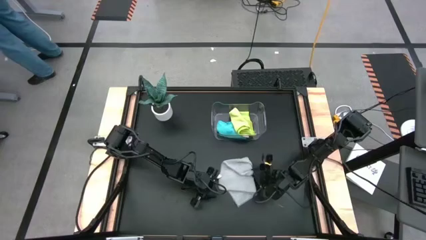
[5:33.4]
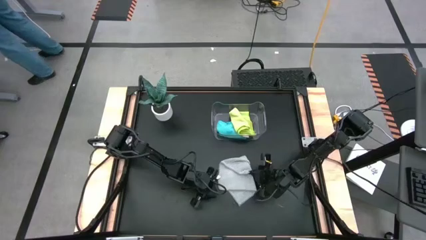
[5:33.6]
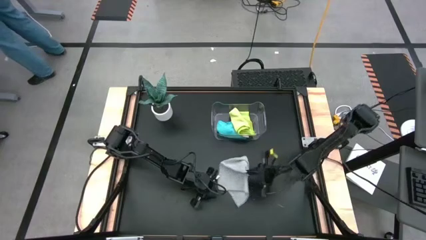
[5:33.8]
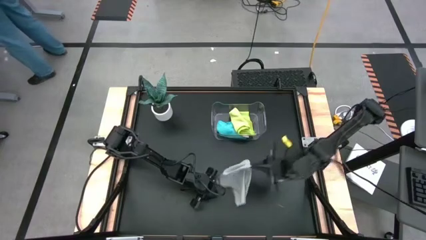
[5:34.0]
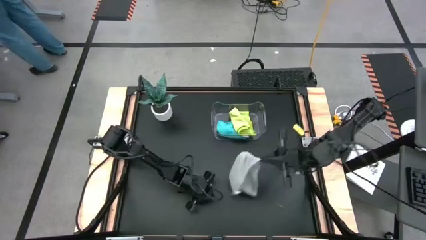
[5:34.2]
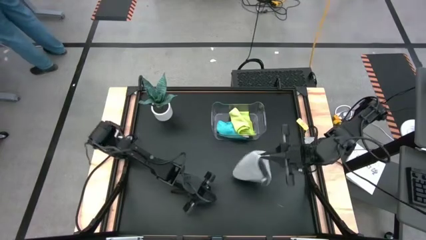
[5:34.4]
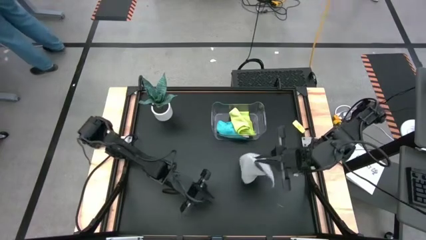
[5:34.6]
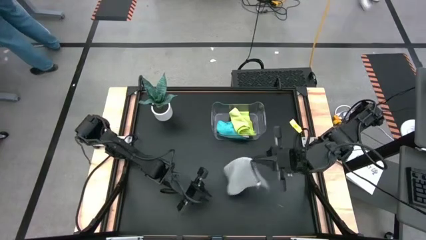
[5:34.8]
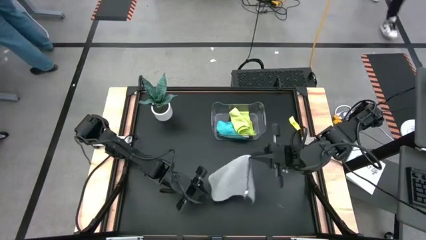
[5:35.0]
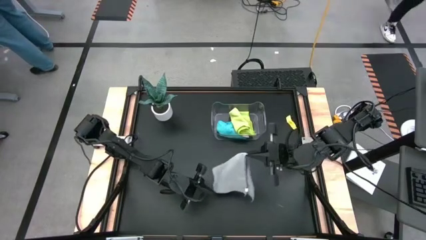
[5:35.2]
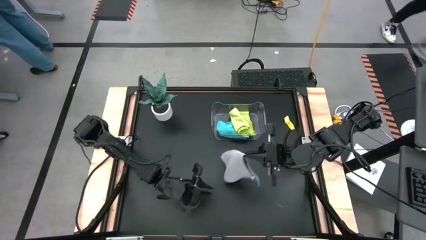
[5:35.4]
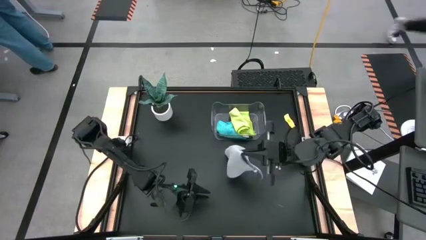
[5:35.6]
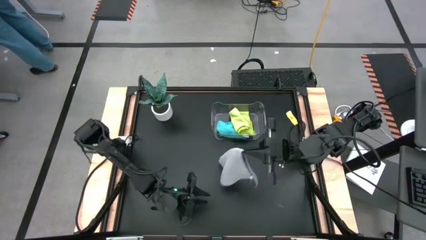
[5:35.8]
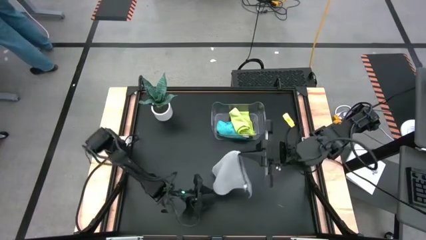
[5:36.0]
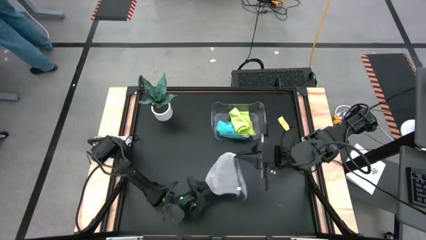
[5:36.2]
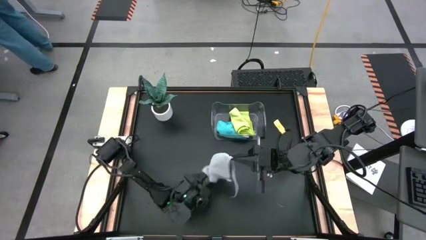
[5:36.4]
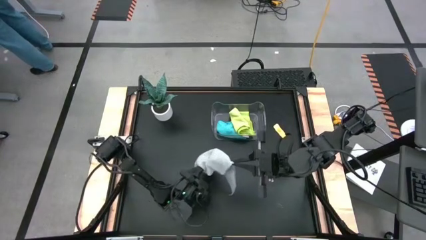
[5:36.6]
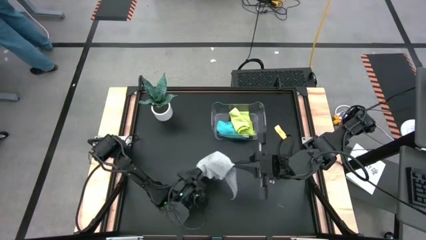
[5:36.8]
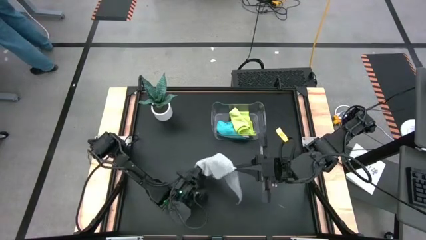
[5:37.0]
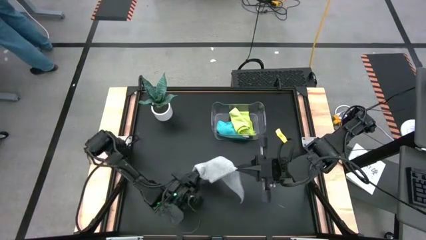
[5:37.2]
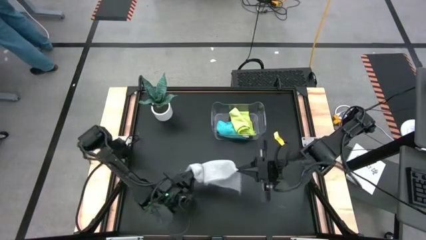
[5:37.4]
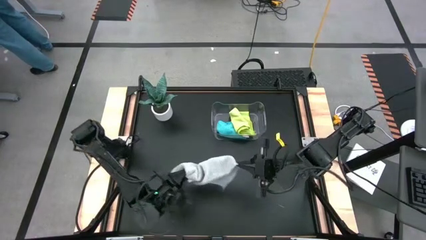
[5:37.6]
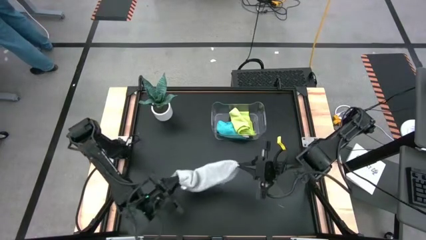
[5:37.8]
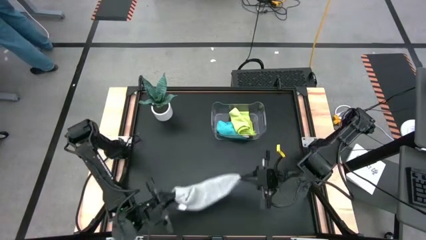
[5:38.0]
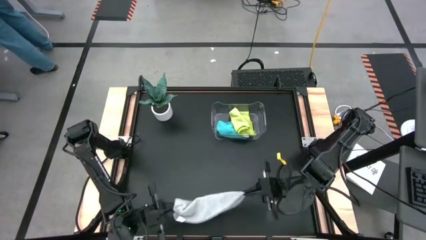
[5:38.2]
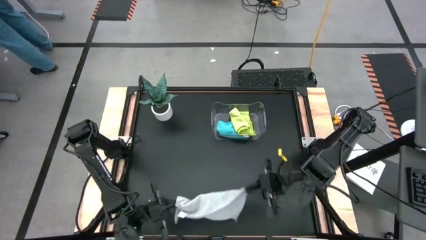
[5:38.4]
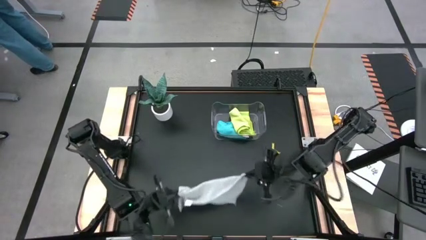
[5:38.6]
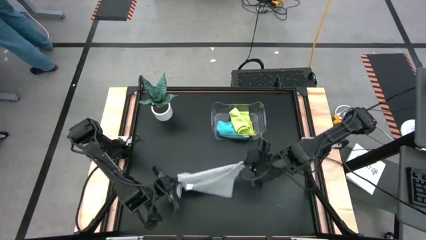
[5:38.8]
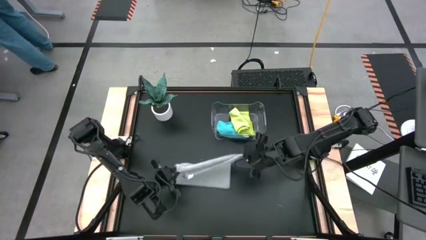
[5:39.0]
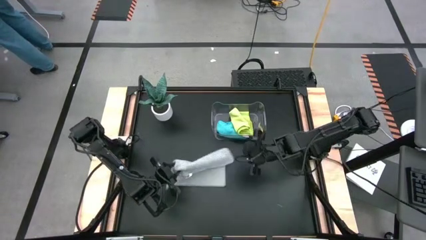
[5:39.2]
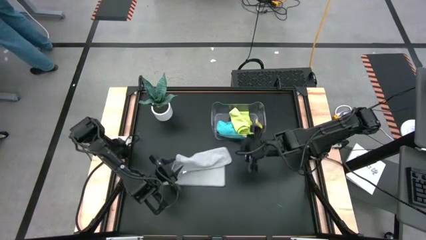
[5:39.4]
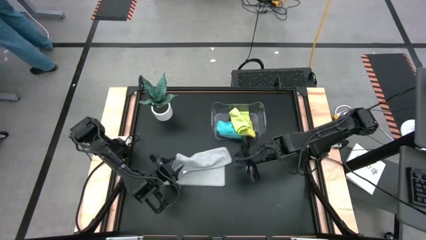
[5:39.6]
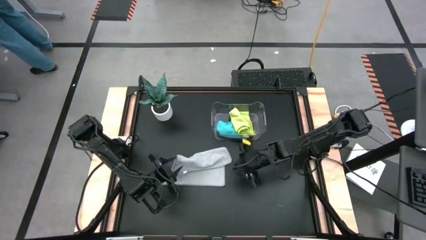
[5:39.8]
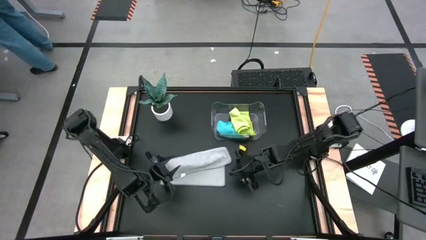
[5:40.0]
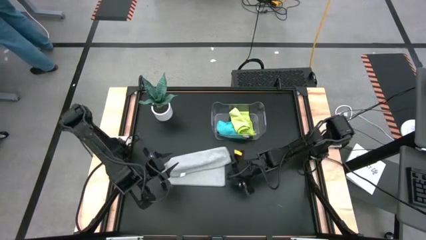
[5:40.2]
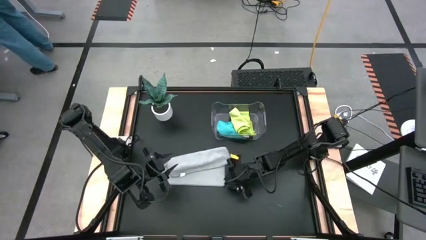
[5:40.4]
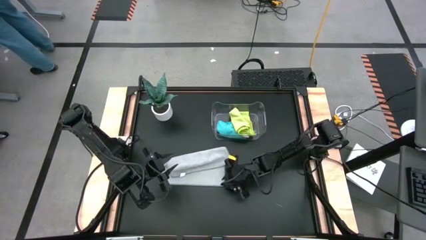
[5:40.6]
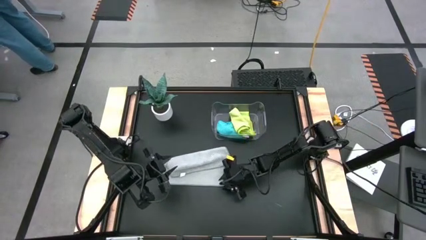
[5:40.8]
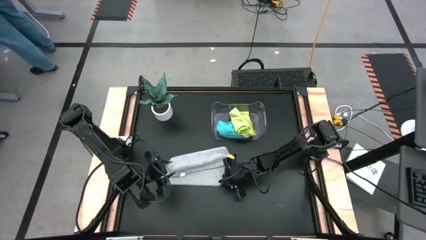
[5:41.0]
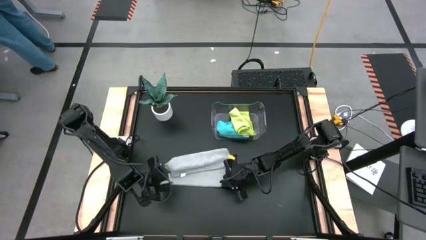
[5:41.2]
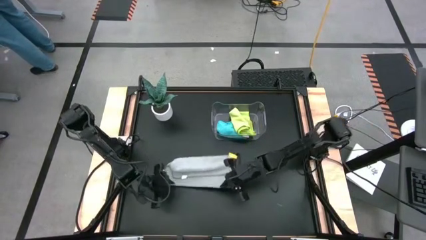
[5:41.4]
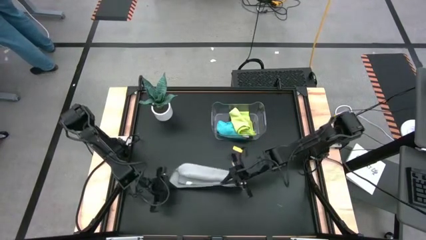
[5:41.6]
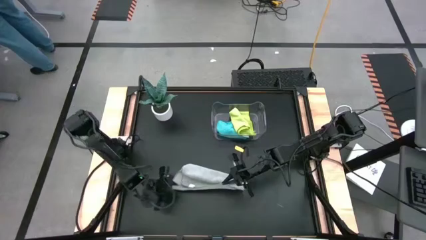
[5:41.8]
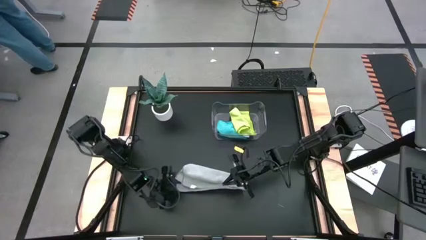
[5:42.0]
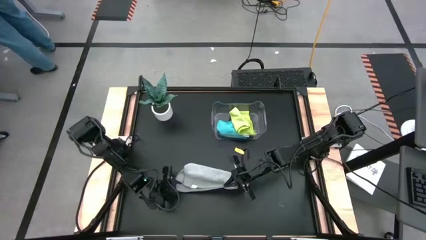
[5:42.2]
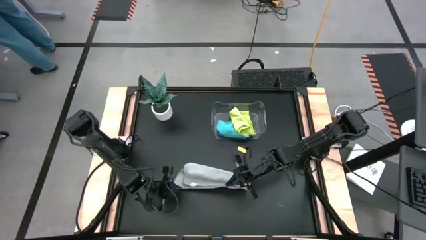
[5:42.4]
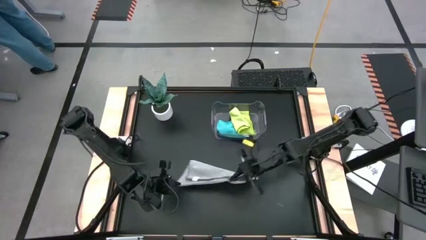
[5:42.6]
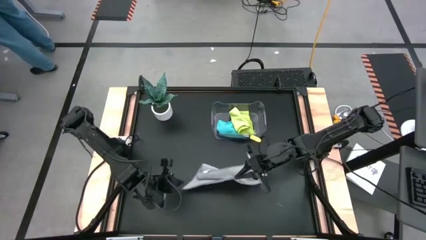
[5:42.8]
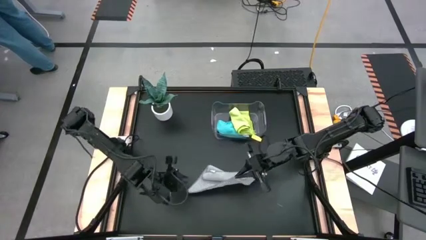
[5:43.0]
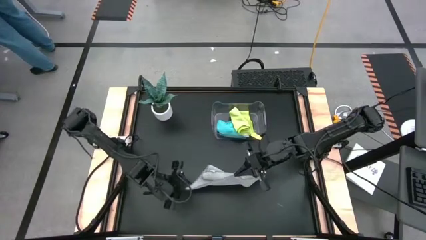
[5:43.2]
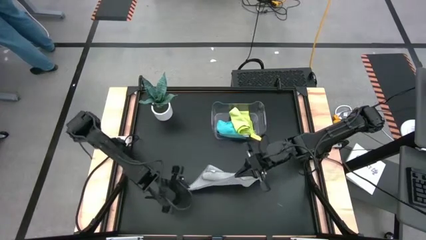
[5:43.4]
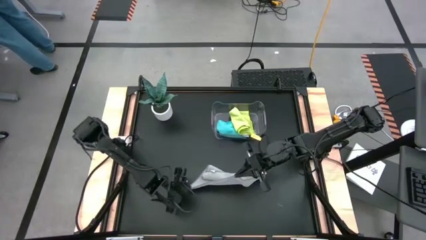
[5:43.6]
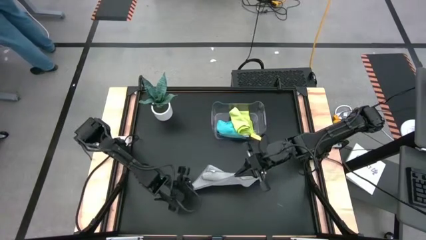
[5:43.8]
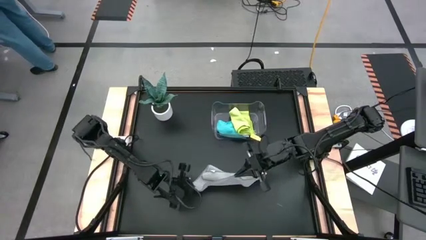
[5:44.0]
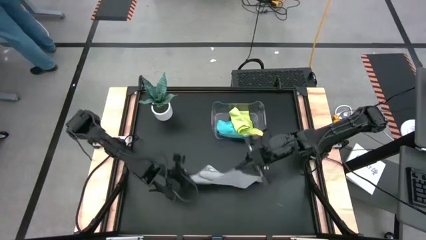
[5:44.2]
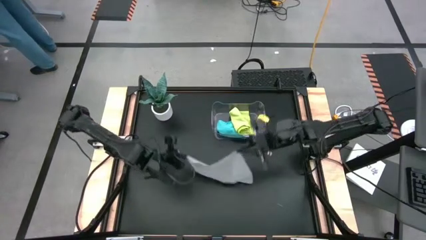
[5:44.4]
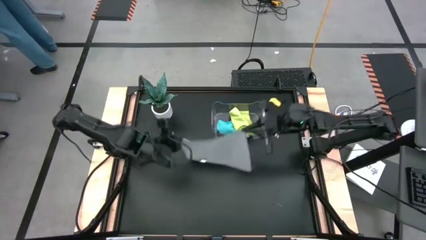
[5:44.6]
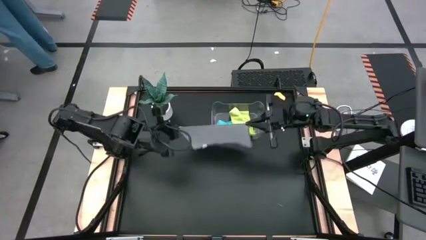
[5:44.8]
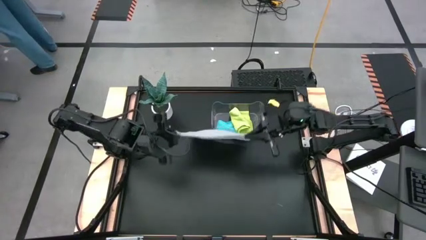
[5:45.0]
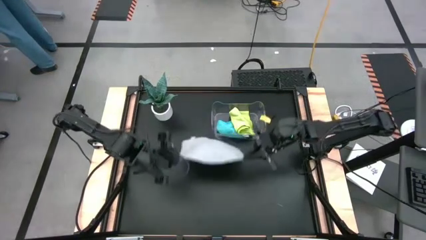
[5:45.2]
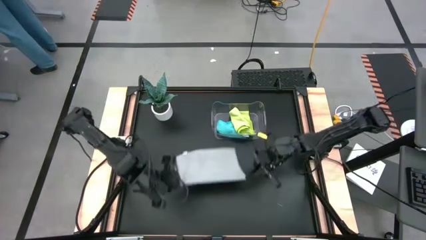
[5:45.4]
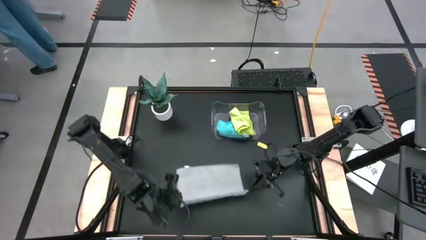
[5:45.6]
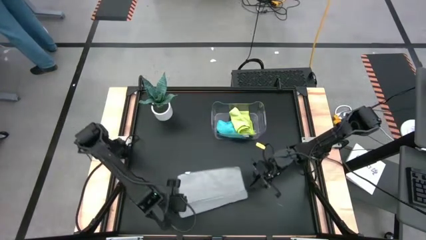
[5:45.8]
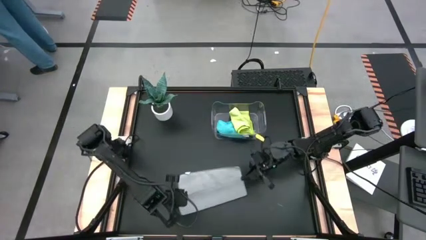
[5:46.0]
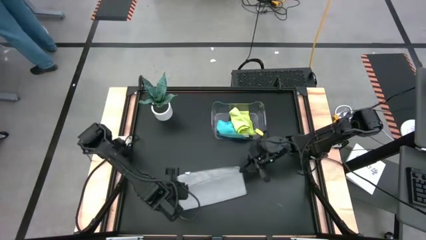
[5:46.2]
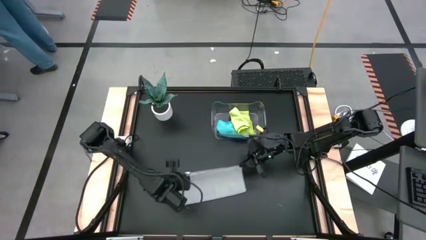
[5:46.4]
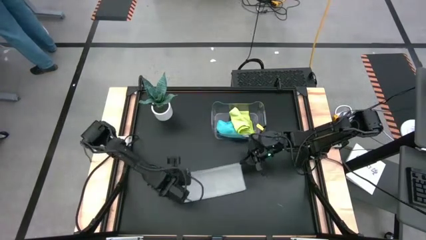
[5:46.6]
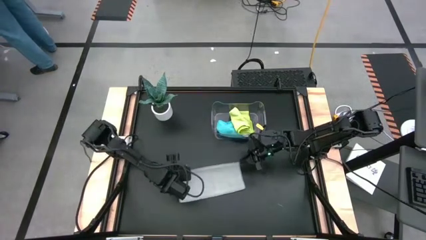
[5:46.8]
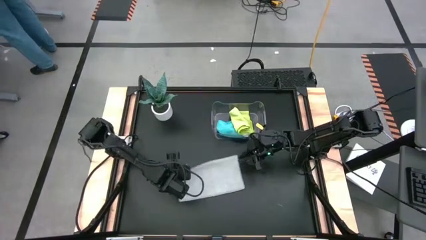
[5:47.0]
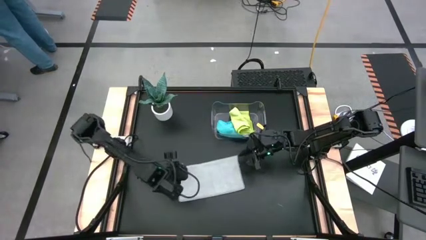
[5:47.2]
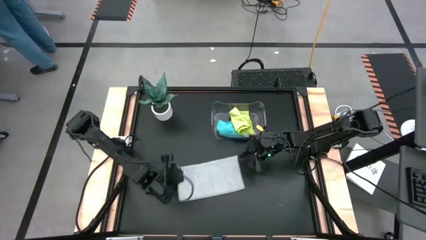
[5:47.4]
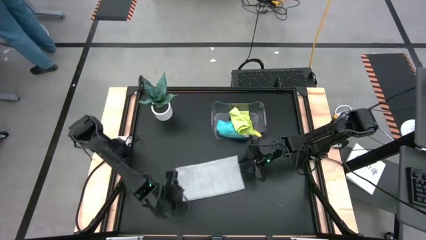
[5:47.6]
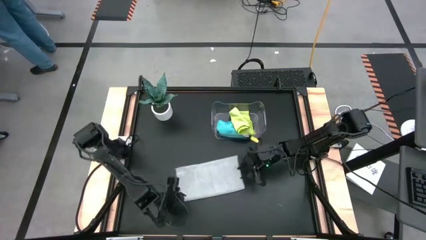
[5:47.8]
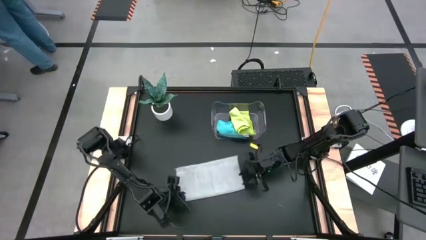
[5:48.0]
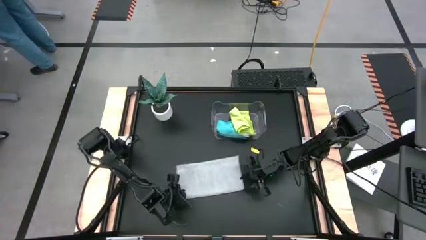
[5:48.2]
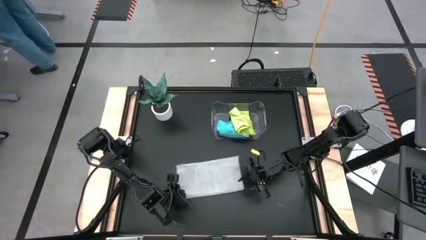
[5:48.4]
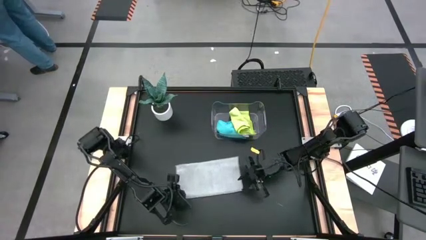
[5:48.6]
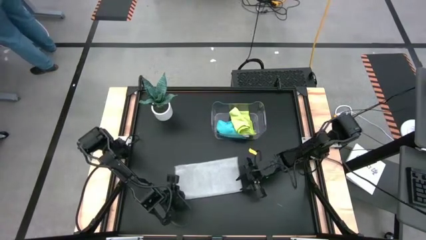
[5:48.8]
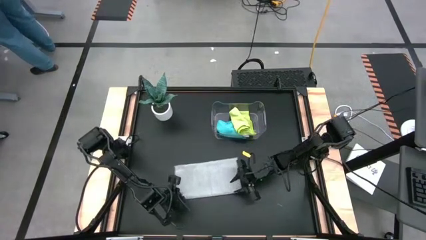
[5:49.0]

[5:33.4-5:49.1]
Task: Fold microfiber towels
Fold the gray towel
